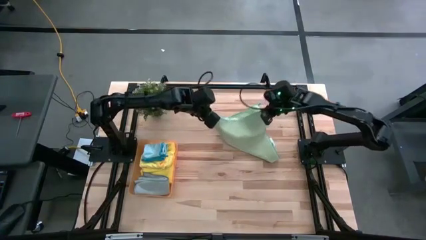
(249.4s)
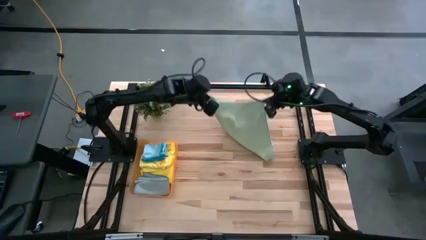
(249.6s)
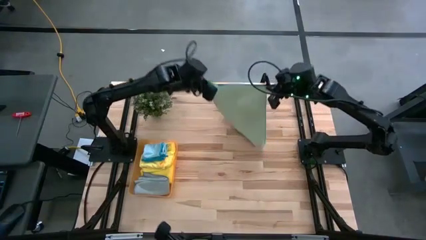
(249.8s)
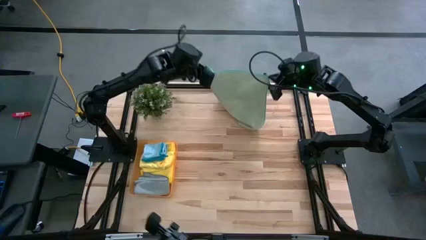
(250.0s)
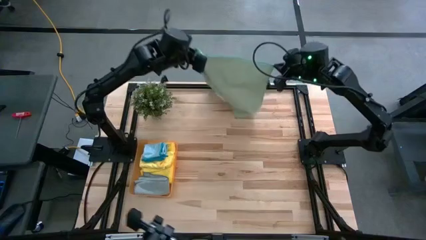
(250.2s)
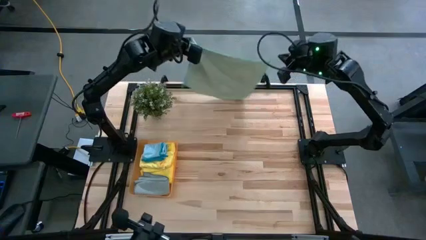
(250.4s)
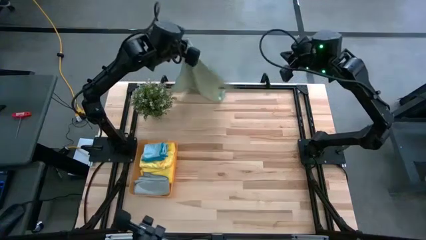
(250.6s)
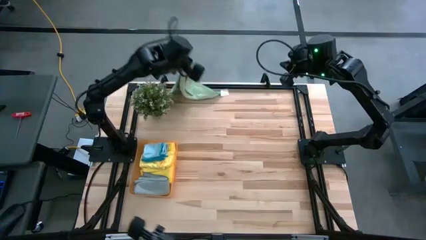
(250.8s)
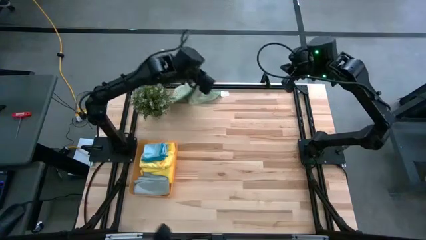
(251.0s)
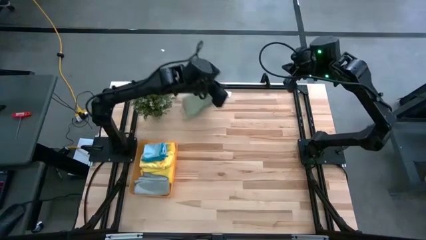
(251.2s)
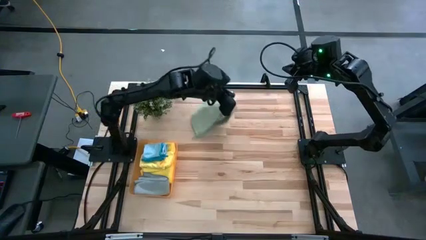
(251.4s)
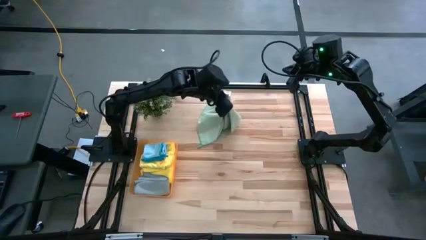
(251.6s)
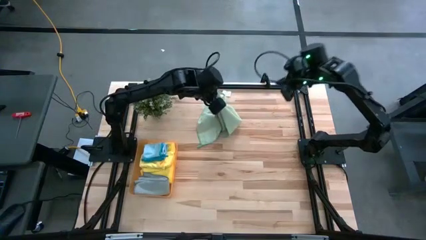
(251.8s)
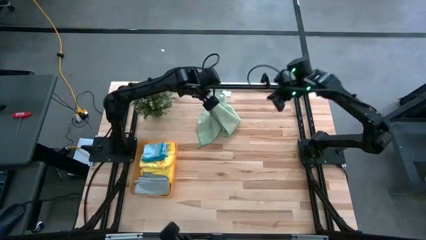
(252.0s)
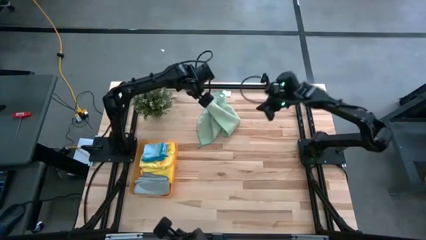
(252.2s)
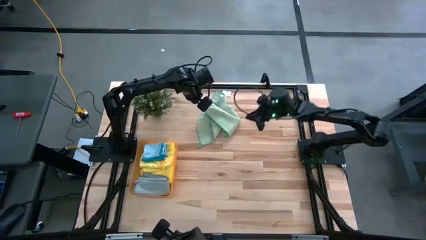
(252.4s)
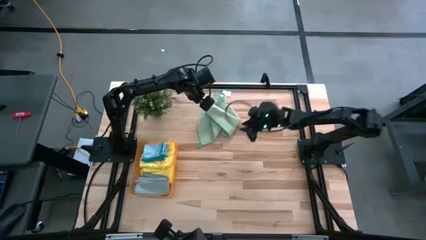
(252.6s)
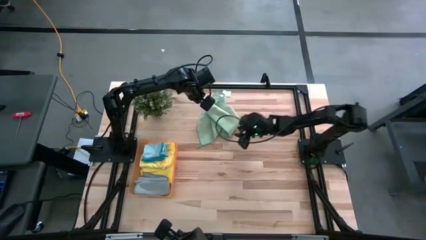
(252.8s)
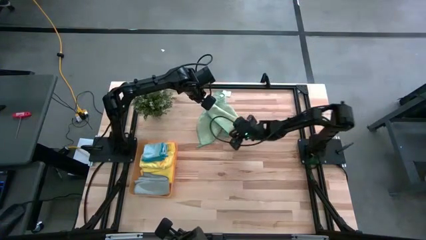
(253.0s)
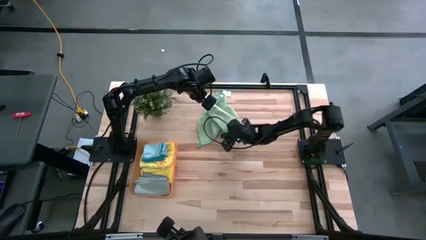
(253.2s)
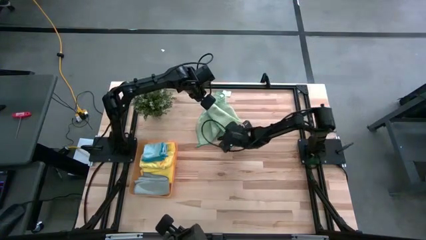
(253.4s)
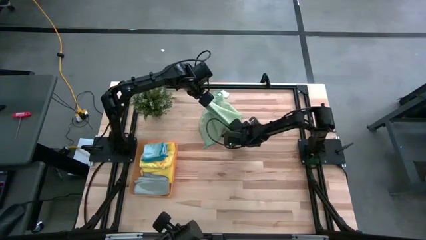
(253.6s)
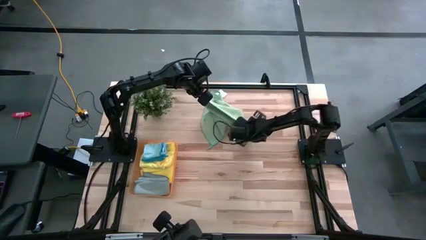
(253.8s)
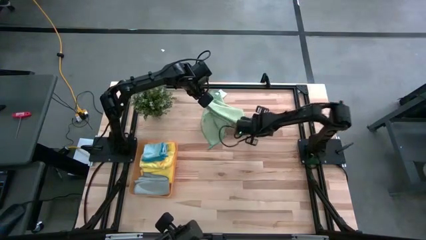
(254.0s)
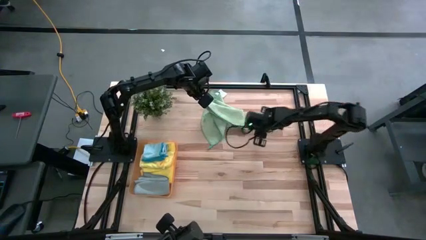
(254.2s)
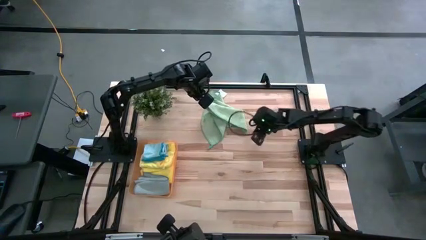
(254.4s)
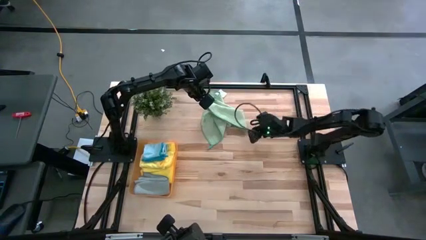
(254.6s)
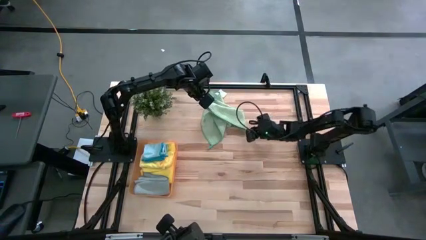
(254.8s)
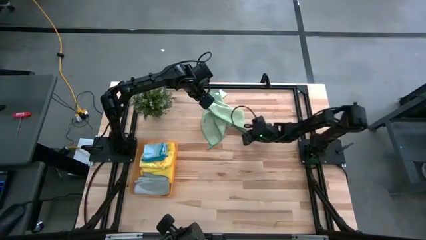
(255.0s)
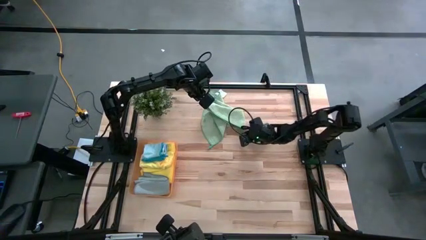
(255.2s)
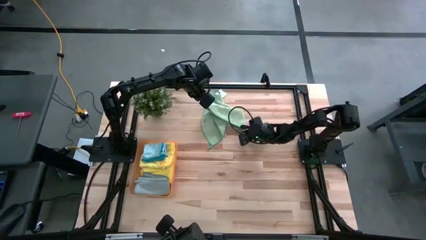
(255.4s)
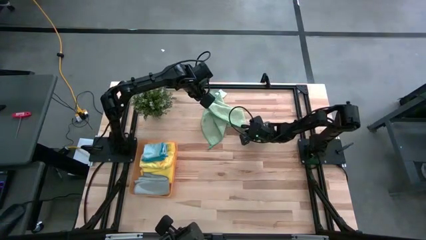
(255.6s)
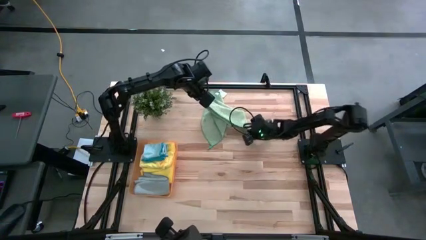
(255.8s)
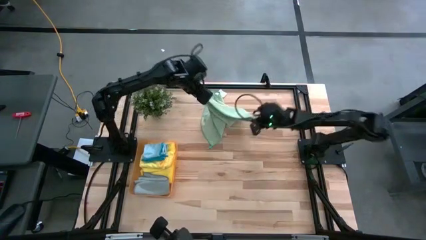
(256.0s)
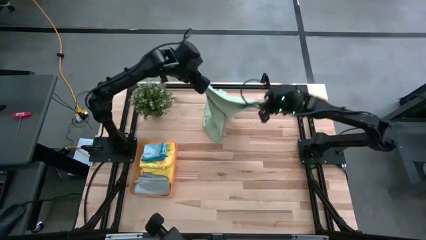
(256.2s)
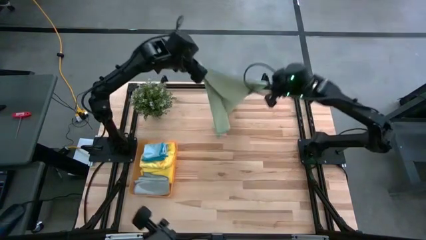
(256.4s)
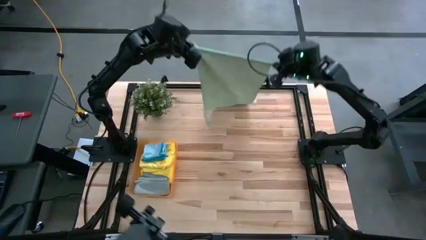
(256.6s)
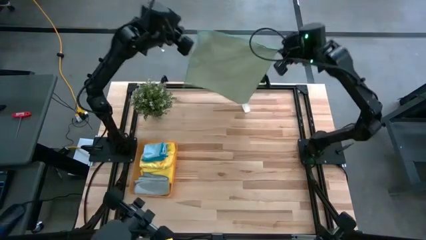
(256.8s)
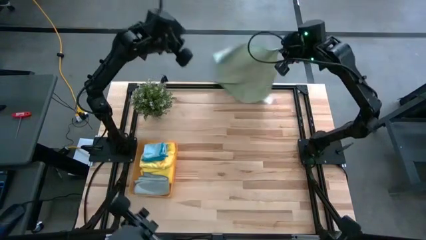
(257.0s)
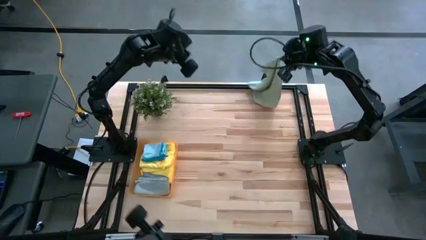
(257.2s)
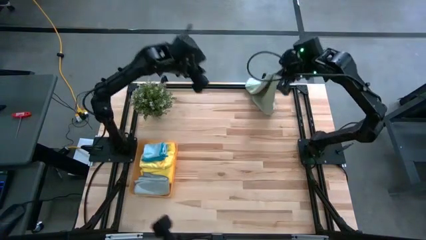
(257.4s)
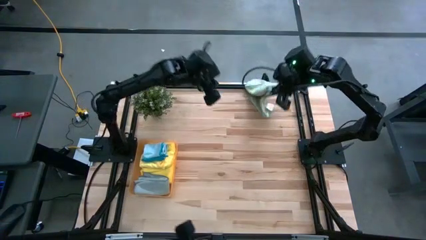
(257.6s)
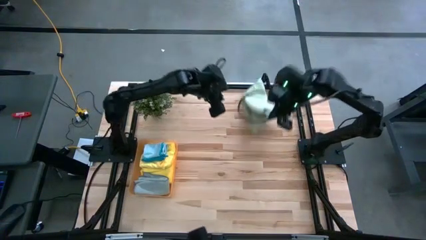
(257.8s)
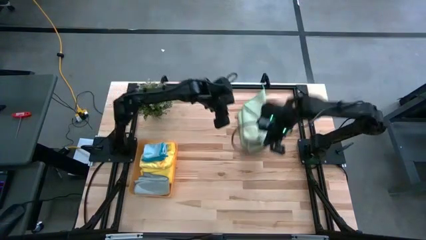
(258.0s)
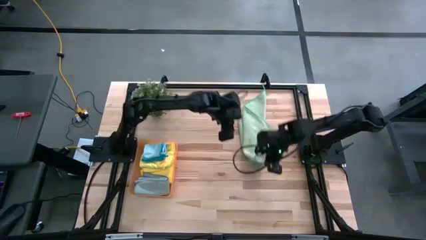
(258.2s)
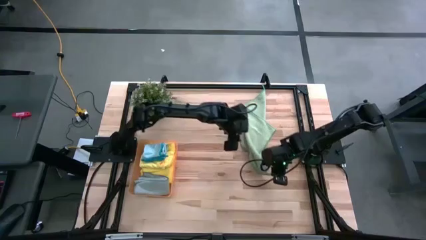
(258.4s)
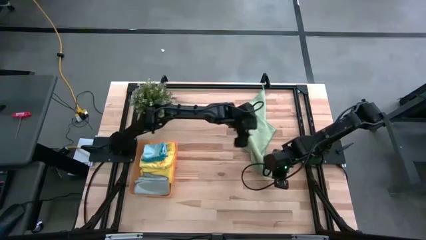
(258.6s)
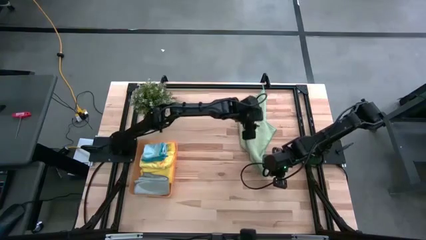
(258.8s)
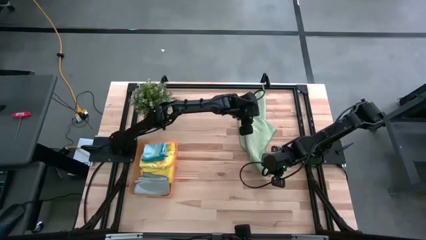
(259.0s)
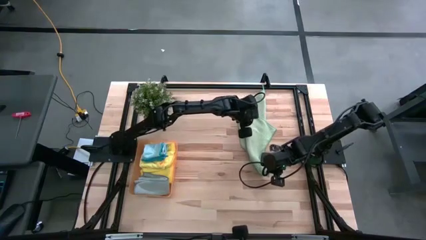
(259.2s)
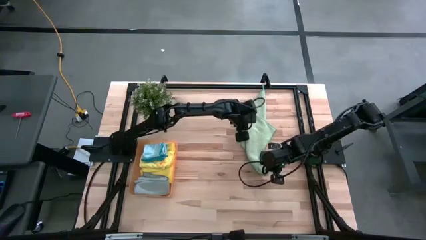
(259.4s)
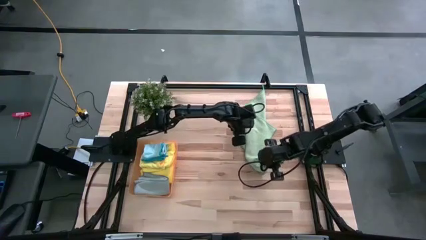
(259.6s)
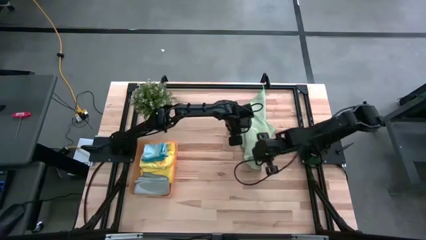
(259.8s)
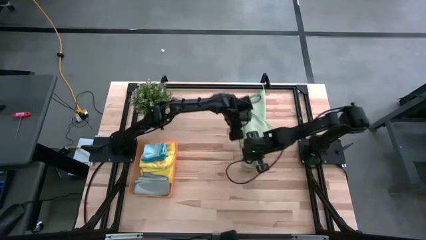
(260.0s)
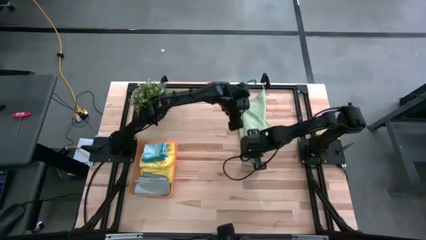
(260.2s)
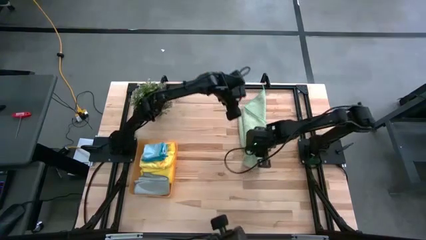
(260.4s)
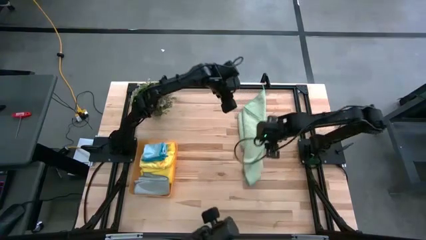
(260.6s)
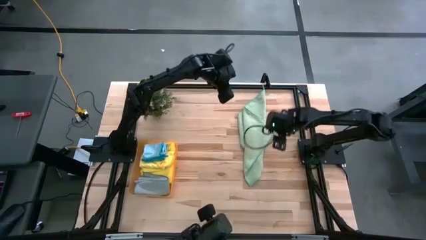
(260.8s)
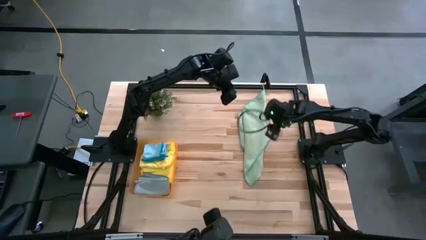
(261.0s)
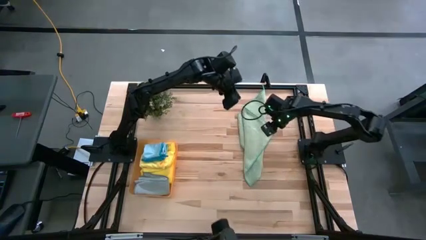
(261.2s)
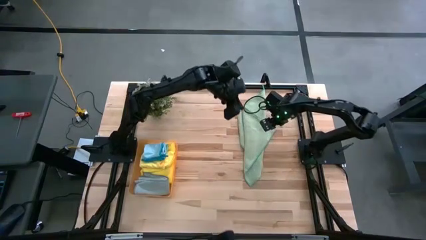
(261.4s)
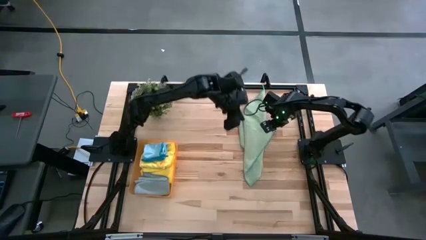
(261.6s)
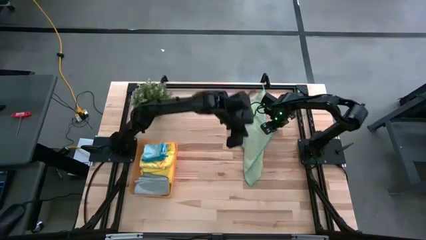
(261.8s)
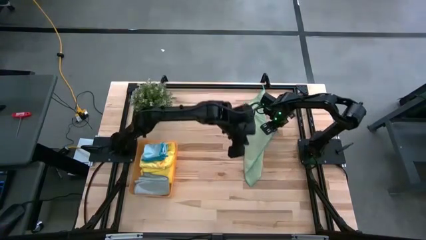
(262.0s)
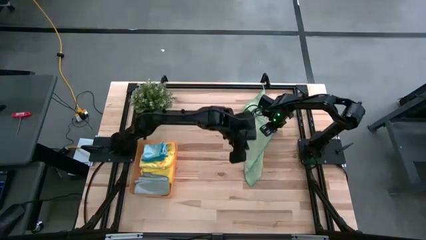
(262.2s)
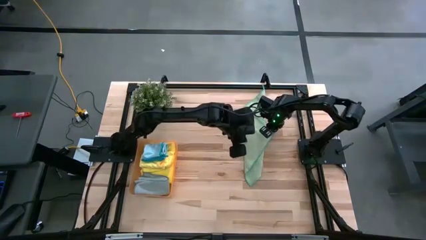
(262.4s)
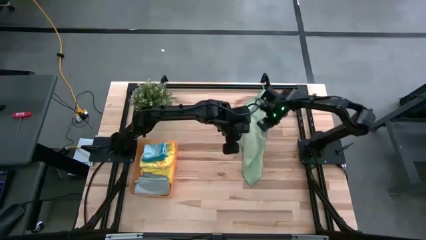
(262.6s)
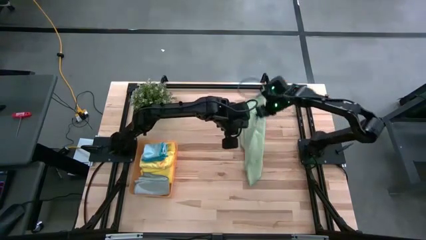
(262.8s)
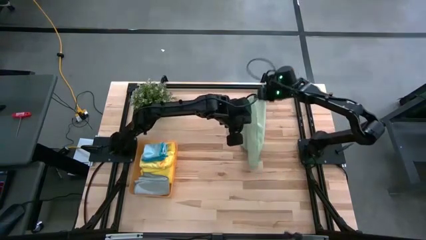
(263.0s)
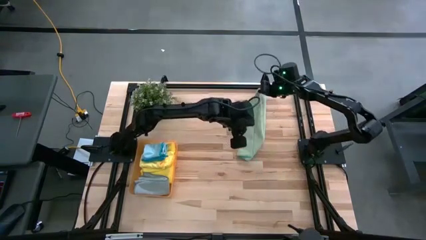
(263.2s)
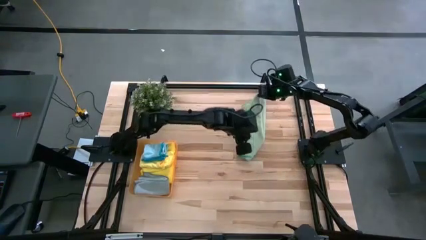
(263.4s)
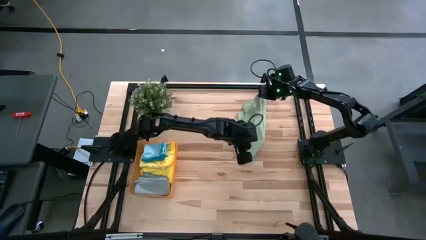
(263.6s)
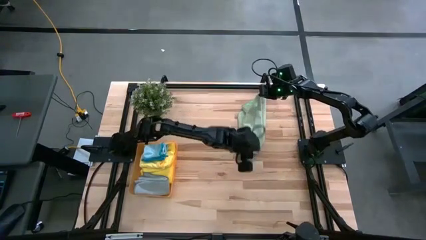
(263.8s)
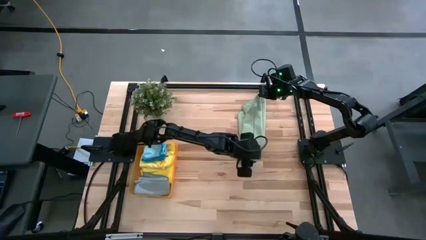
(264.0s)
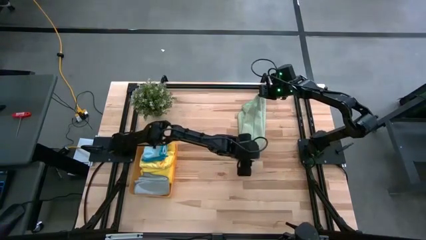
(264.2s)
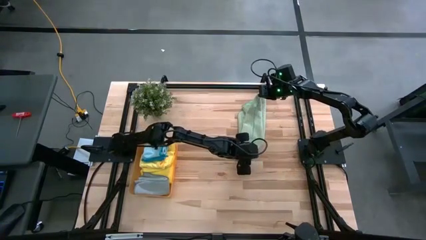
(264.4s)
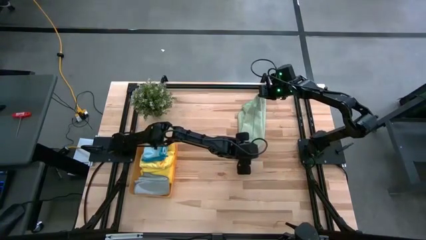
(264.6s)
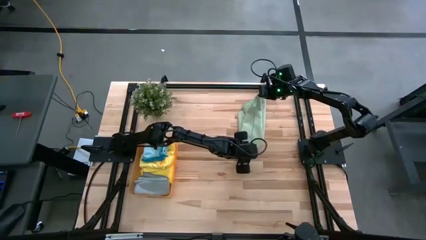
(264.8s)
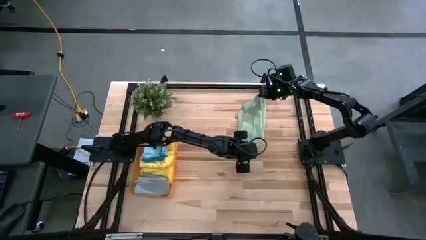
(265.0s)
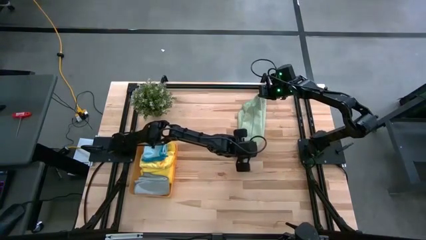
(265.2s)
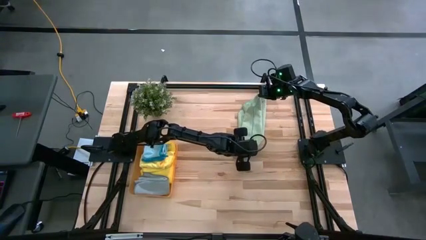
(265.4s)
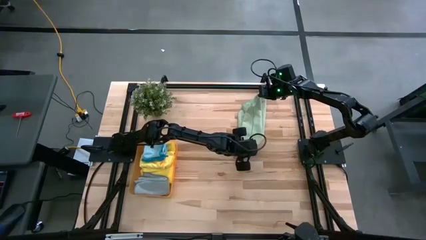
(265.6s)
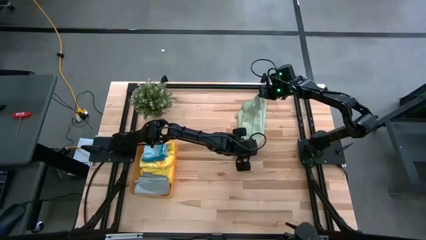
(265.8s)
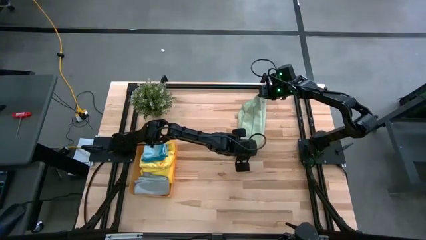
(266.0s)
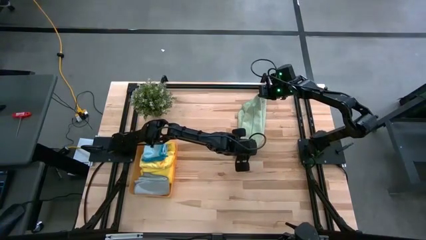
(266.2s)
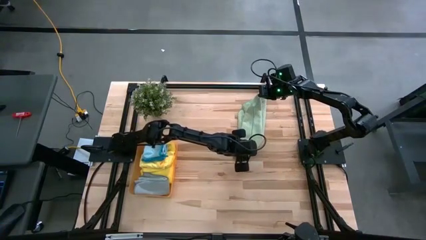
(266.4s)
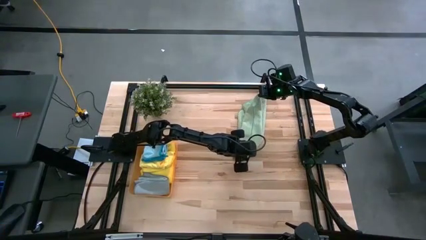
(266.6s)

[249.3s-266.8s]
Task: Fold microfiber towels
Fold the green microfiber towel
